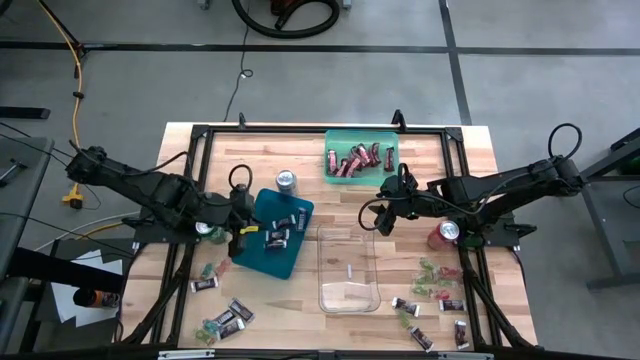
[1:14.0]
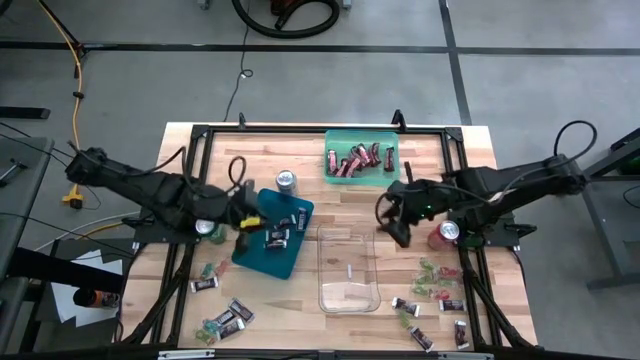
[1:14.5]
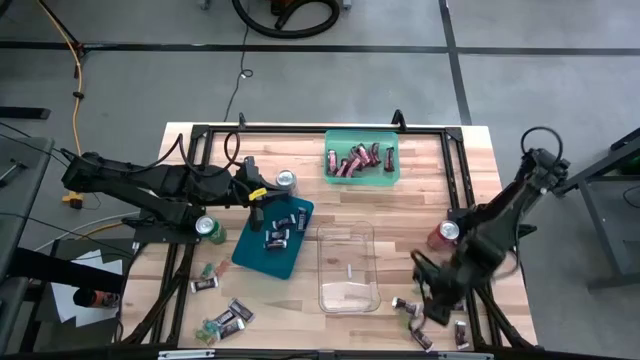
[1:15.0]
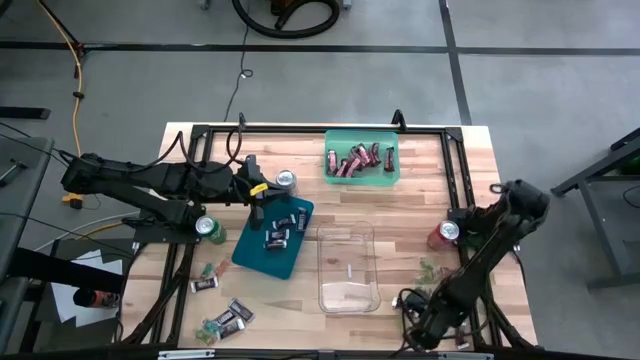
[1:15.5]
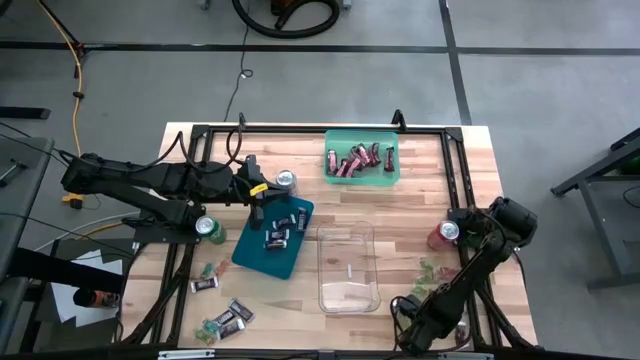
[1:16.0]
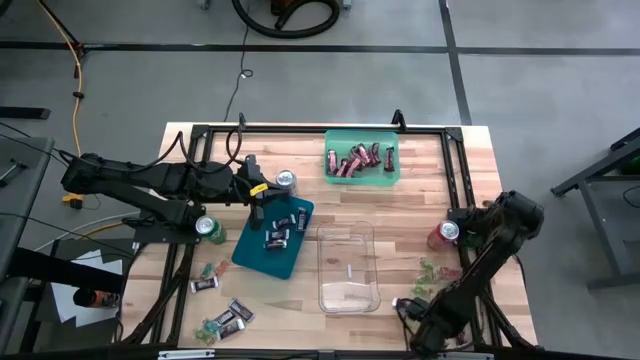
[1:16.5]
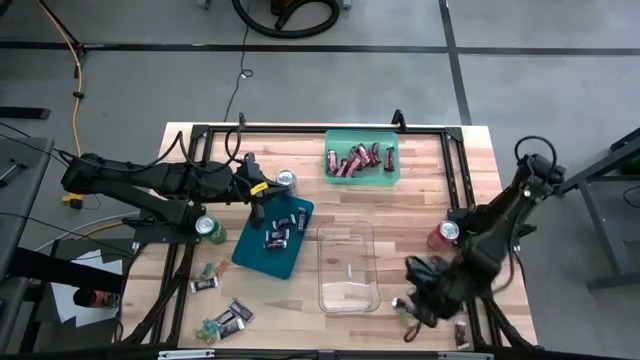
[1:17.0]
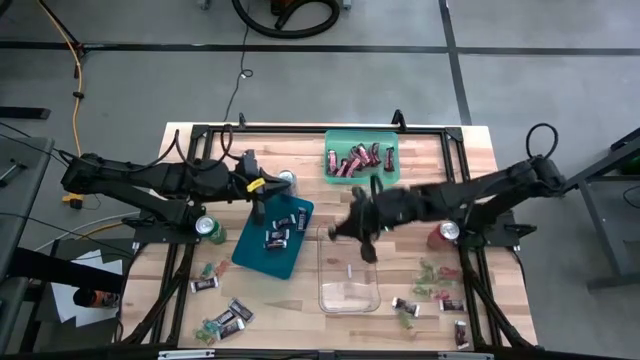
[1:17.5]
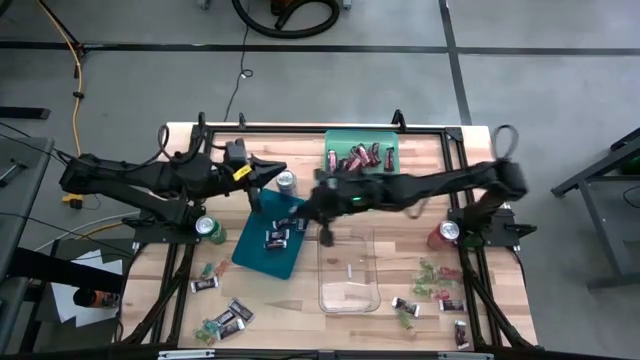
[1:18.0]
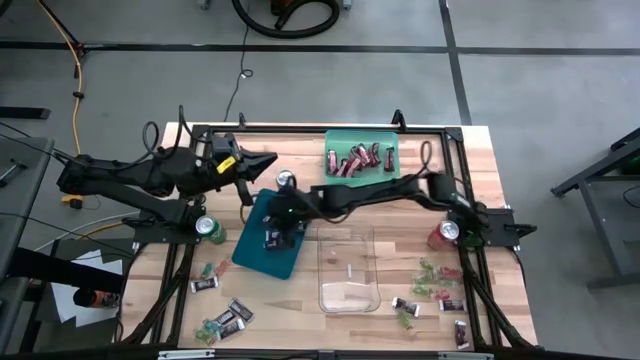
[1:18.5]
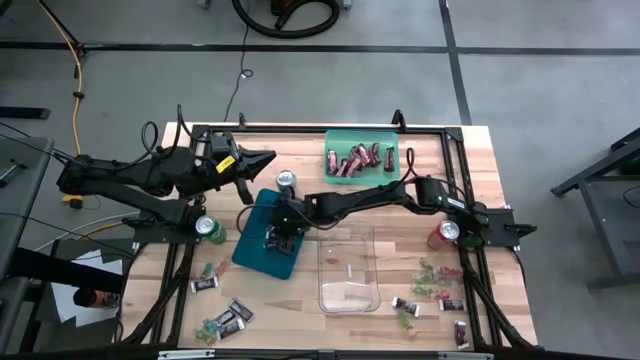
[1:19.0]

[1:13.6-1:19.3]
Task: Sort candy
Put the chocolate bar into the blue bin

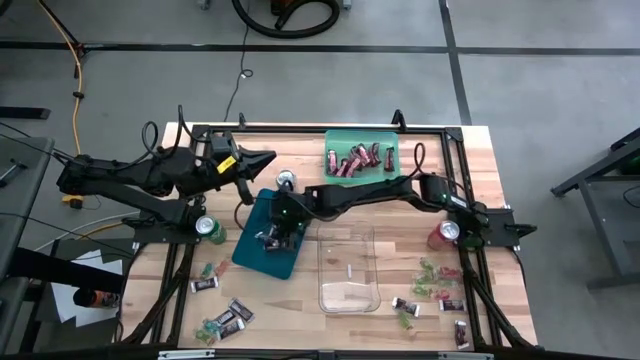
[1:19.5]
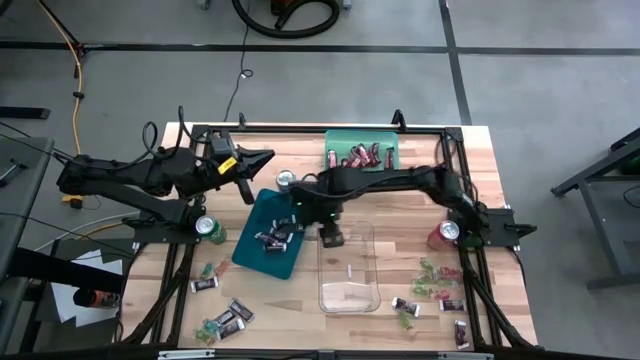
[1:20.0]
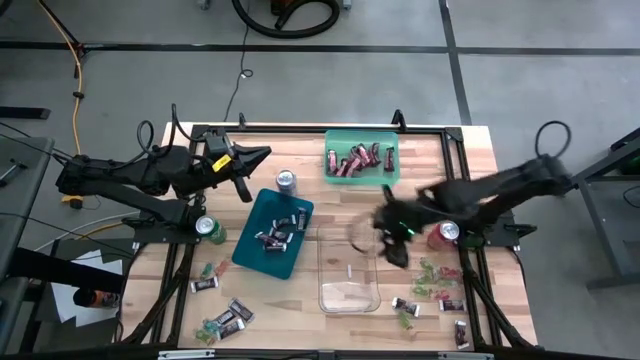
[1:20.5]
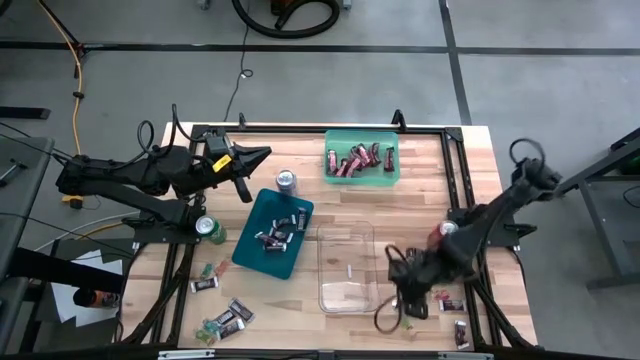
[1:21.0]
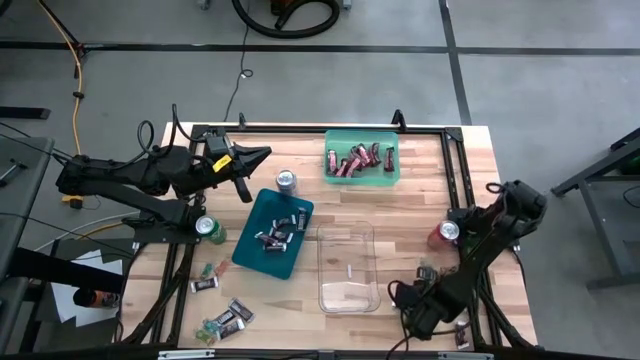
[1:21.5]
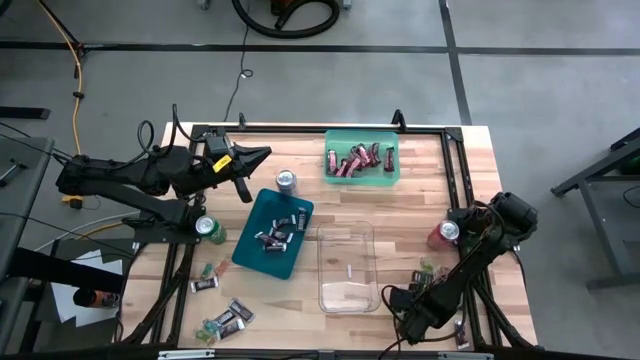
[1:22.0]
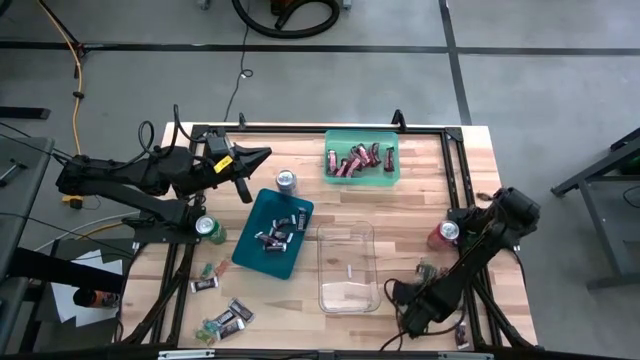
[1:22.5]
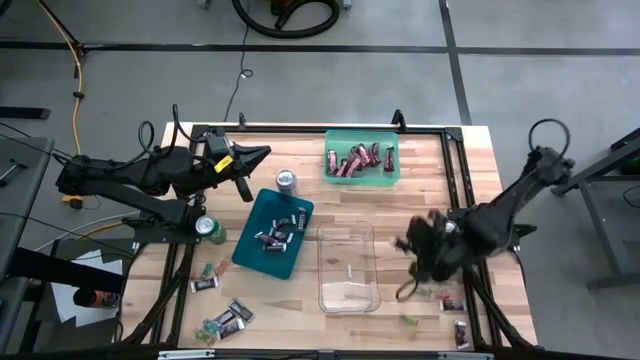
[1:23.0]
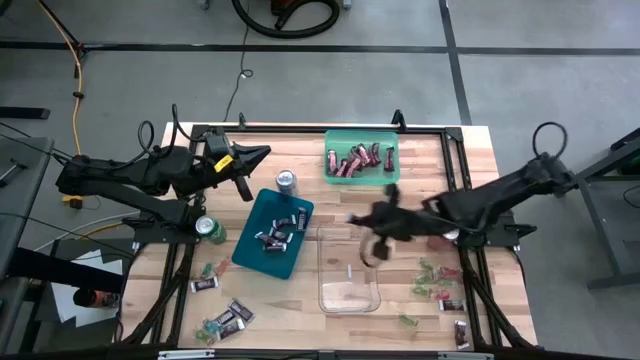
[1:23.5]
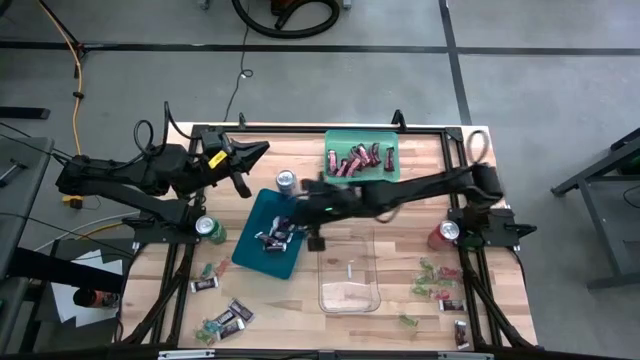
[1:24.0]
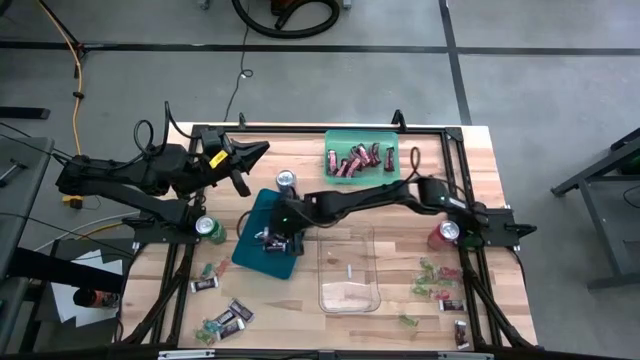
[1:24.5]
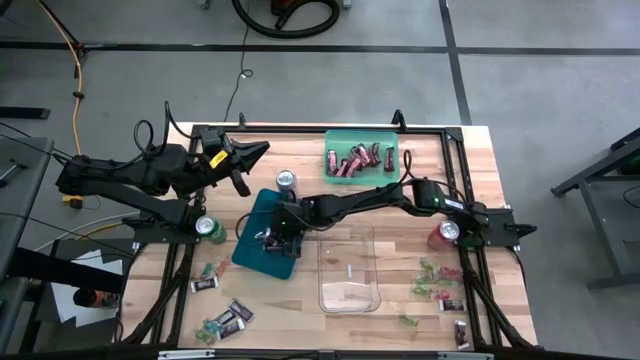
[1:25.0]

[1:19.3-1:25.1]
Put the chocolate bar into the blue bin

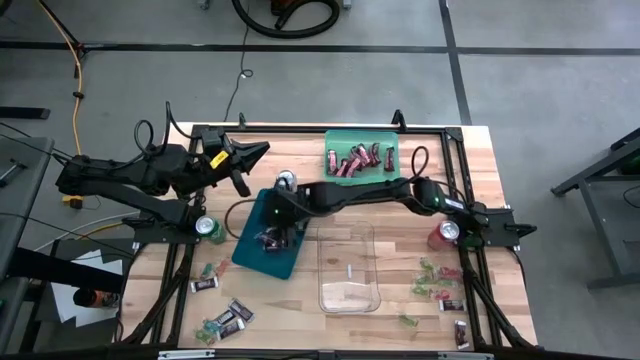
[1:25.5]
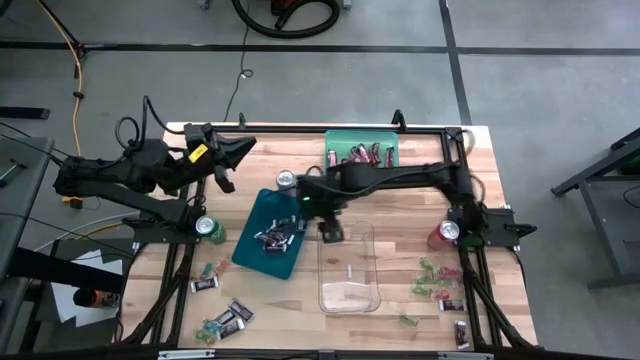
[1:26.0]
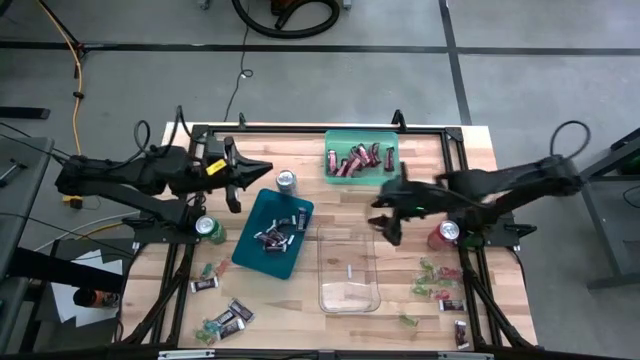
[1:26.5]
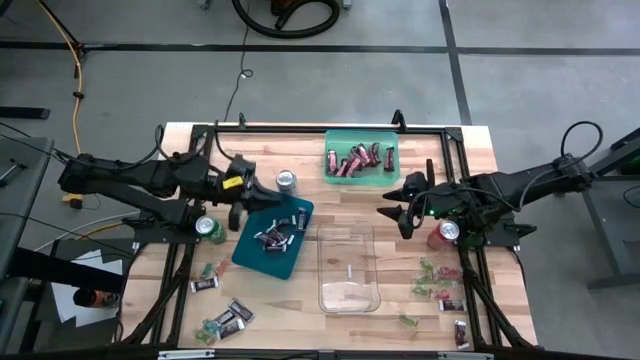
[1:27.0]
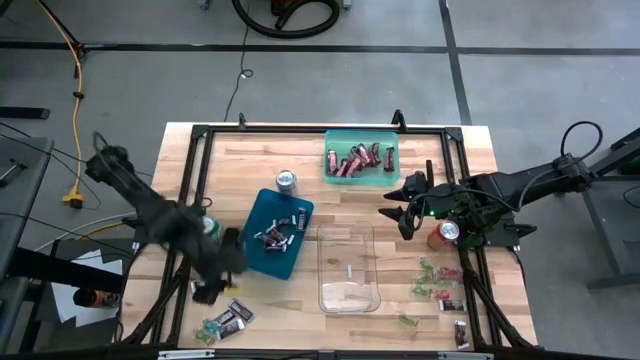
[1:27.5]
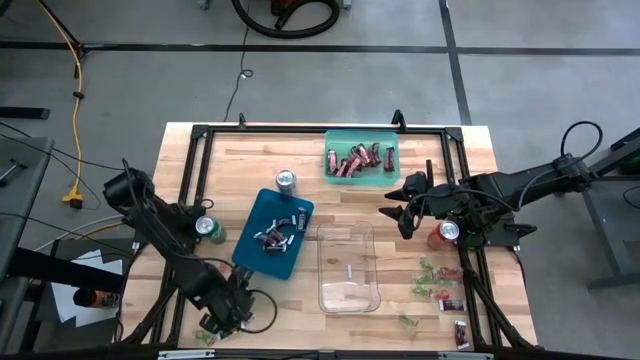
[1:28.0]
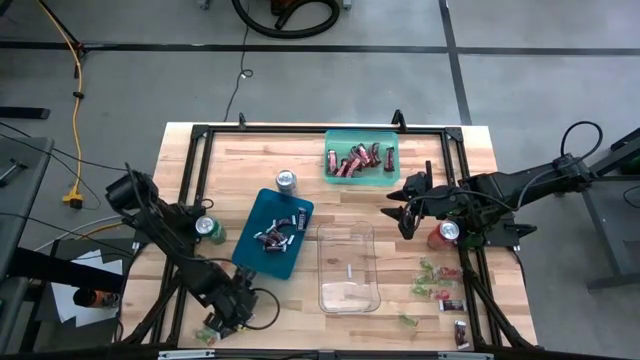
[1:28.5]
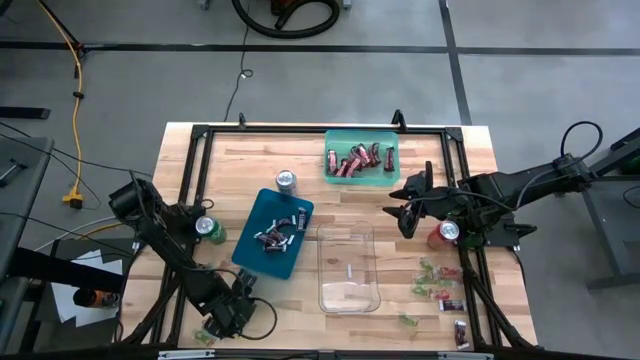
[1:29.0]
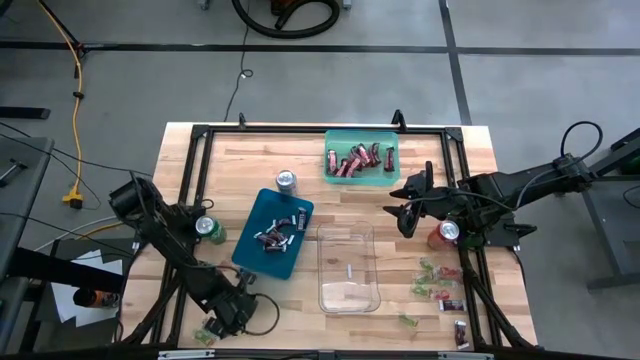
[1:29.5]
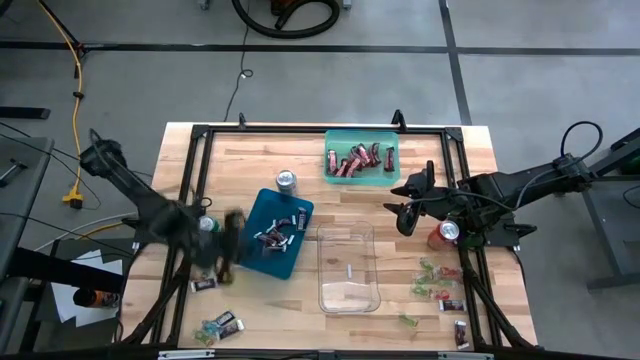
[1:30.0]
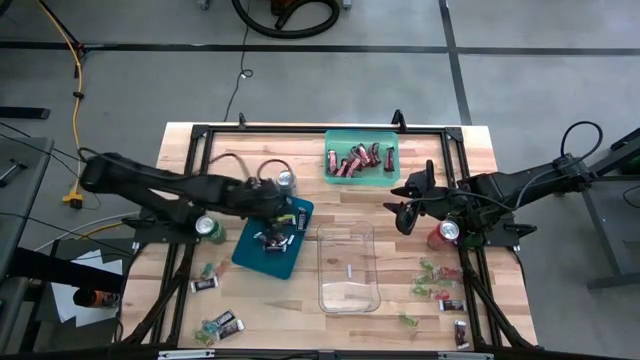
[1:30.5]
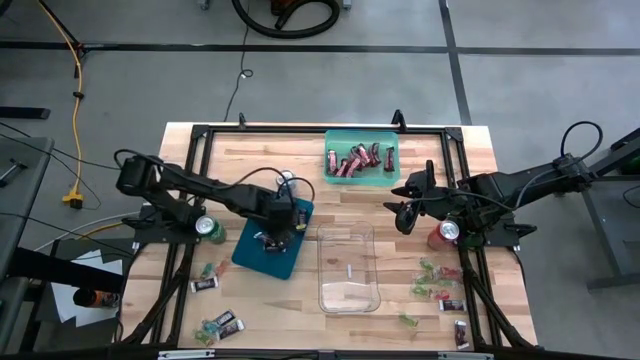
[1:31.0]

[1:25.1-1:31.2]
Put the chocolate bar into the blue bin

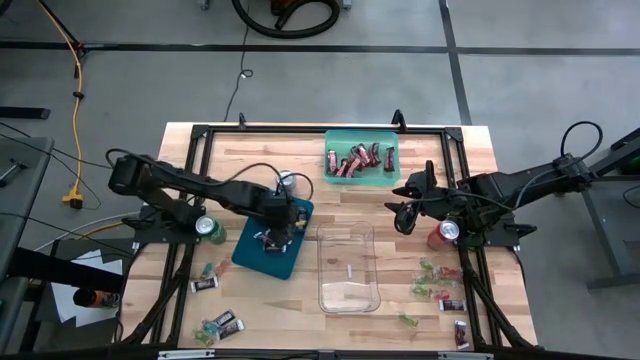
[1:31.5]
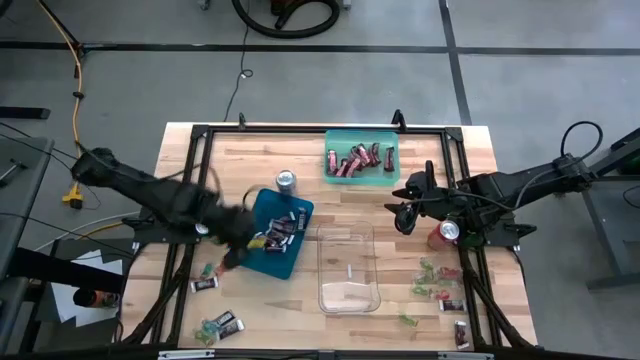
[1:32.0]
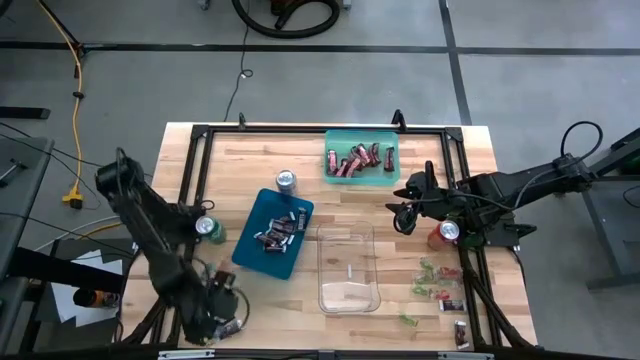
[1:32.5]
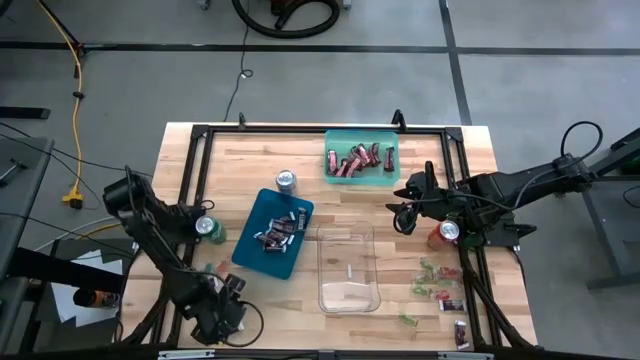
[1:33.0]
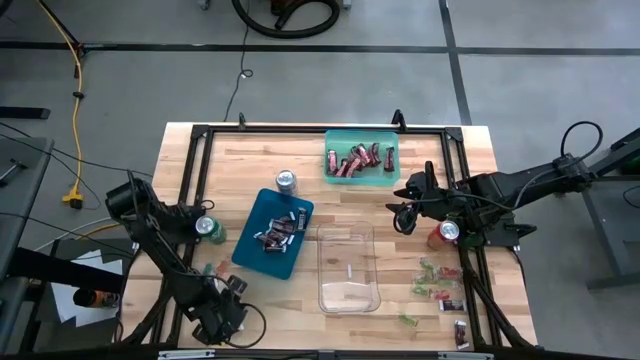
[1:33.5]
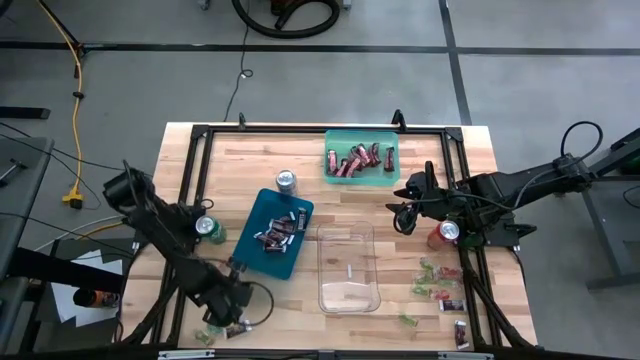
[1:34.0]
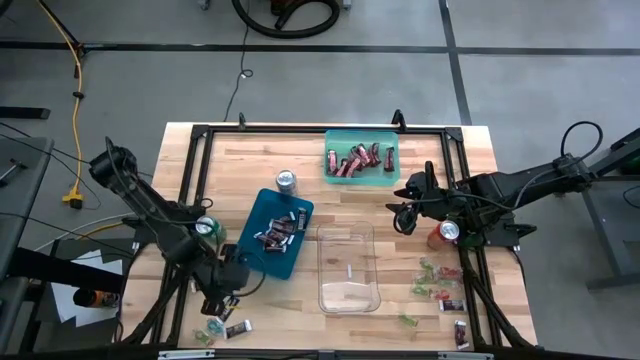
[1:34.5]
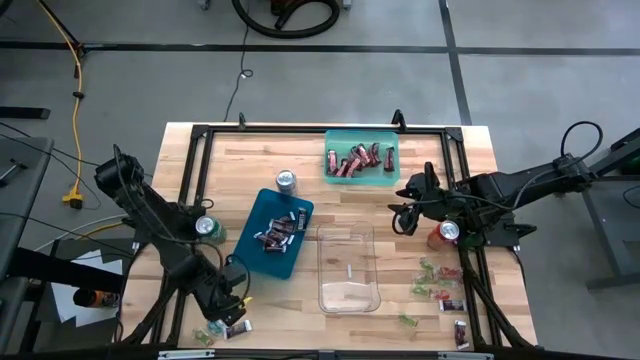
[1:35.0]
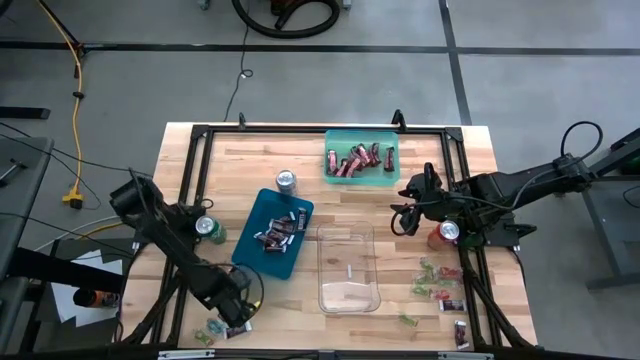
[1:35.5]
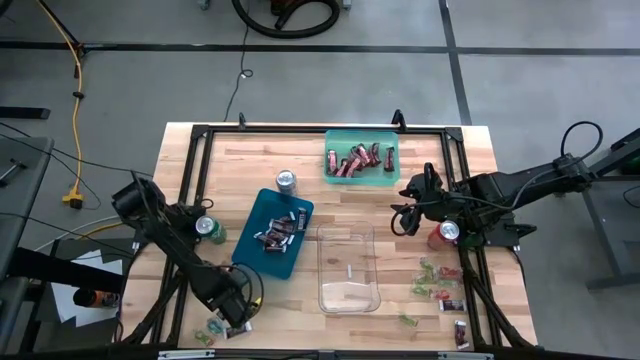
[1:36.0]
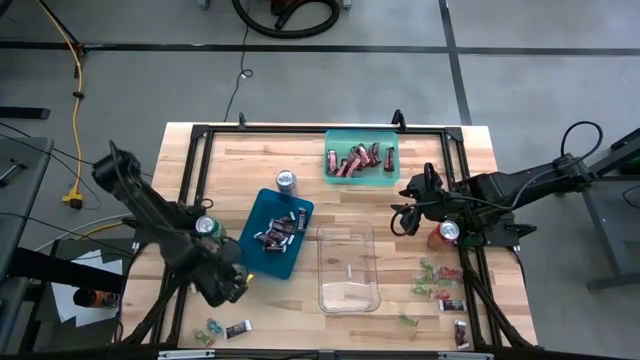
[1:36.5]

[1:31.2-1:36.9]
Put the chocolate bar into the blue bin
